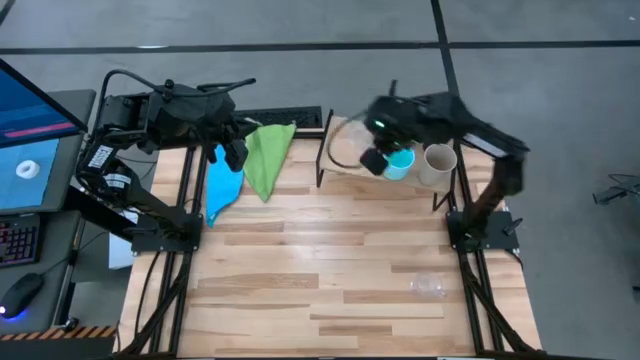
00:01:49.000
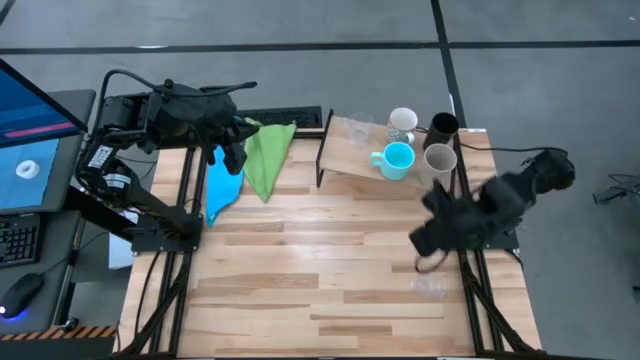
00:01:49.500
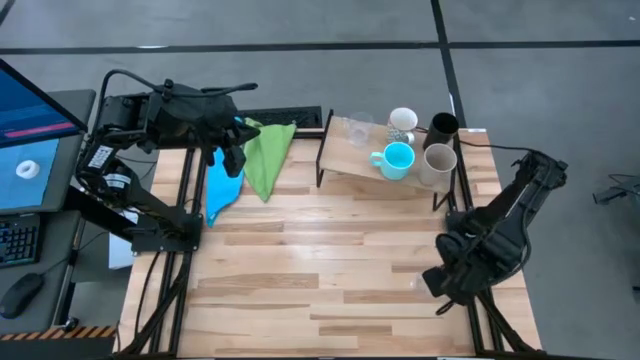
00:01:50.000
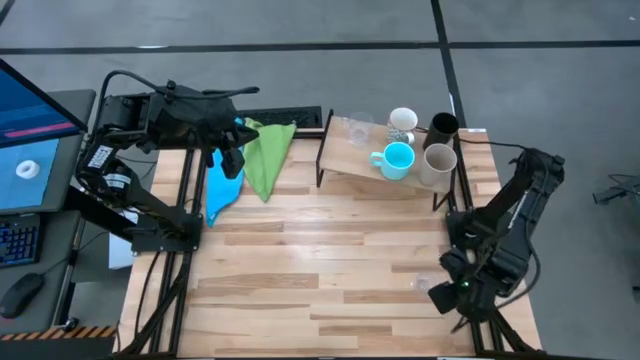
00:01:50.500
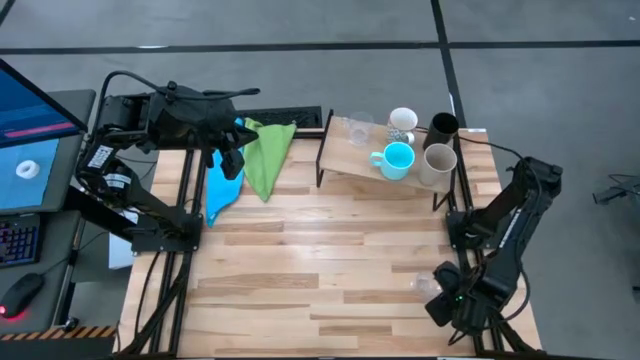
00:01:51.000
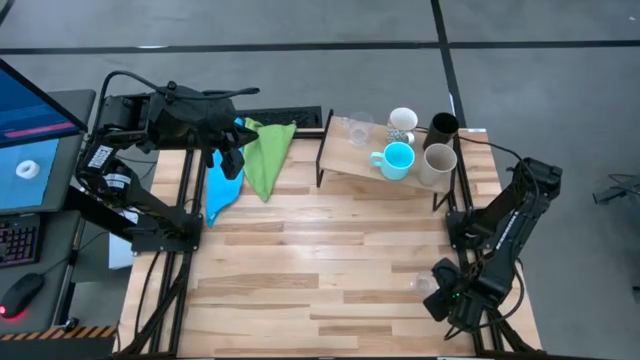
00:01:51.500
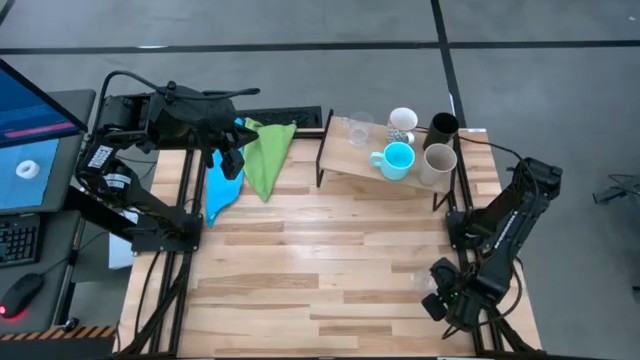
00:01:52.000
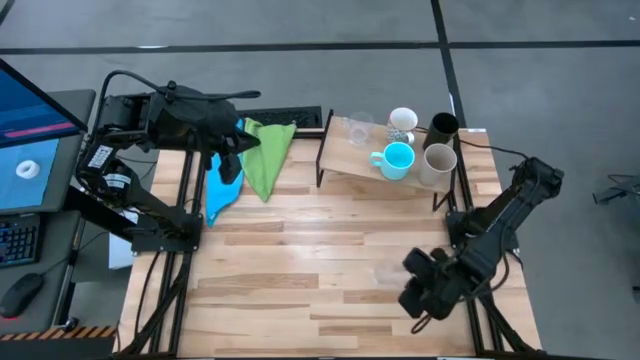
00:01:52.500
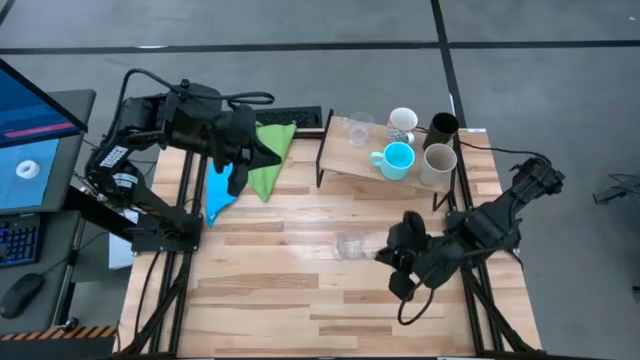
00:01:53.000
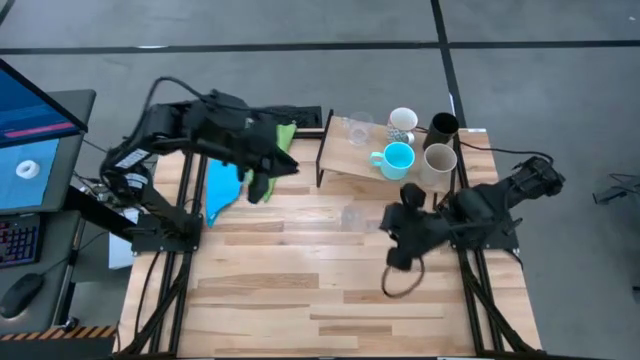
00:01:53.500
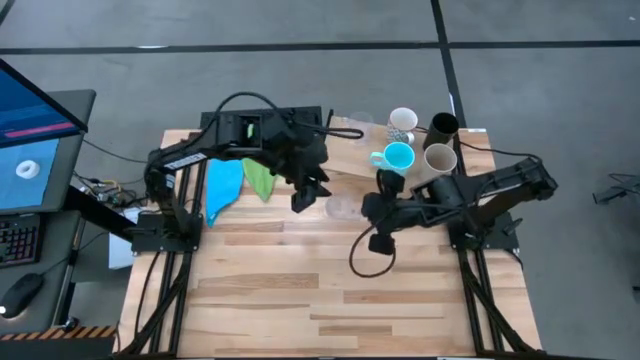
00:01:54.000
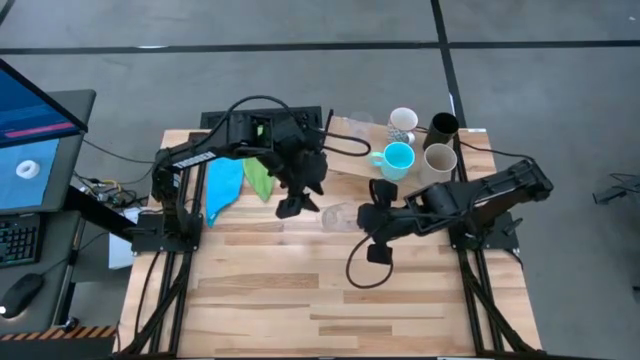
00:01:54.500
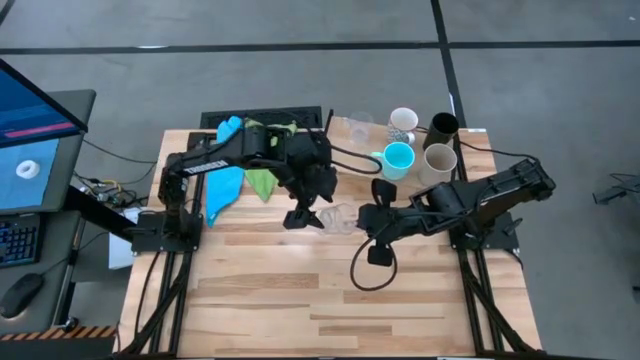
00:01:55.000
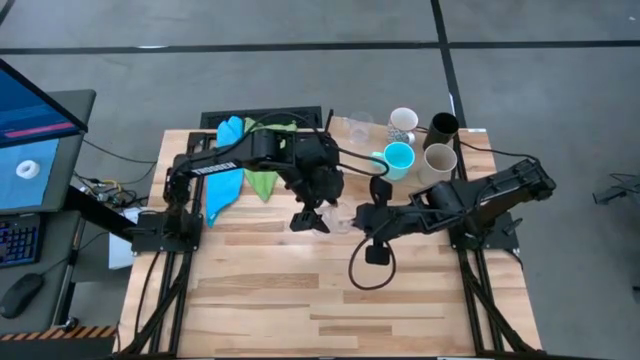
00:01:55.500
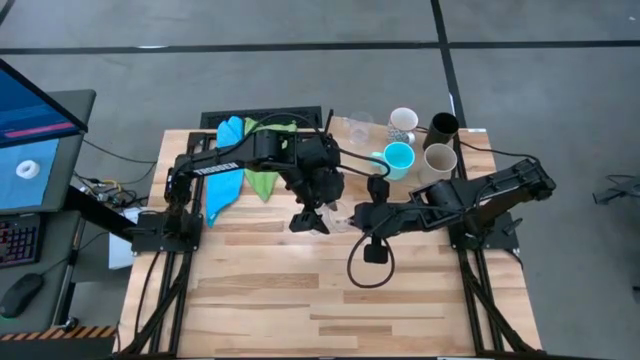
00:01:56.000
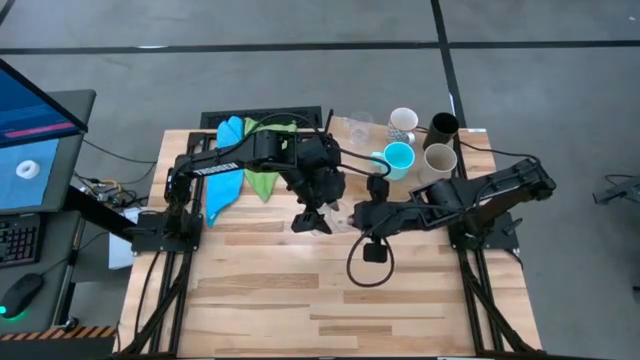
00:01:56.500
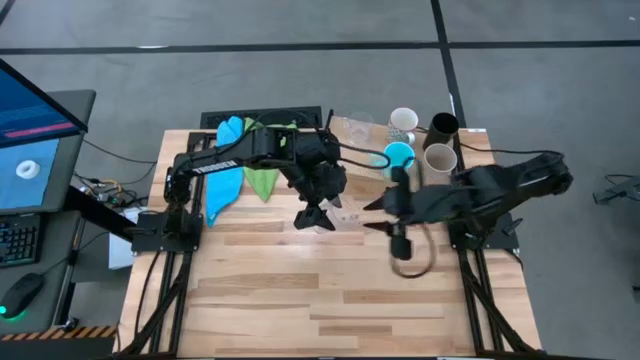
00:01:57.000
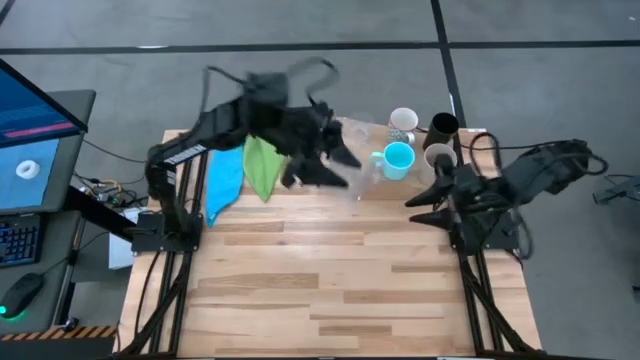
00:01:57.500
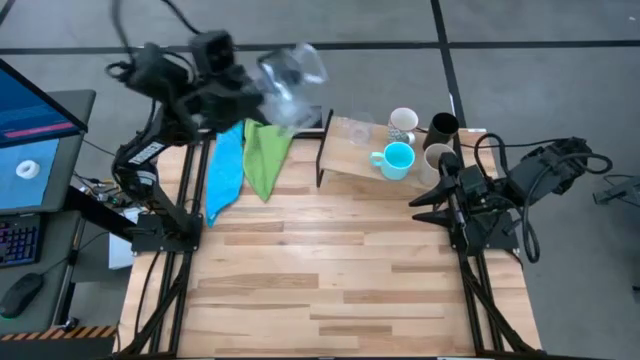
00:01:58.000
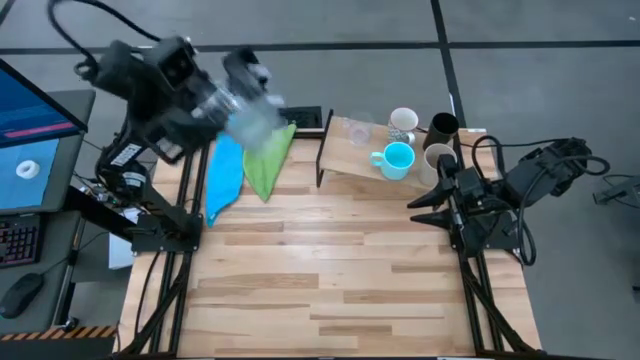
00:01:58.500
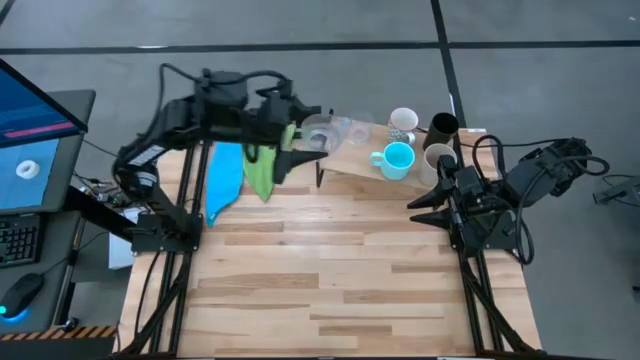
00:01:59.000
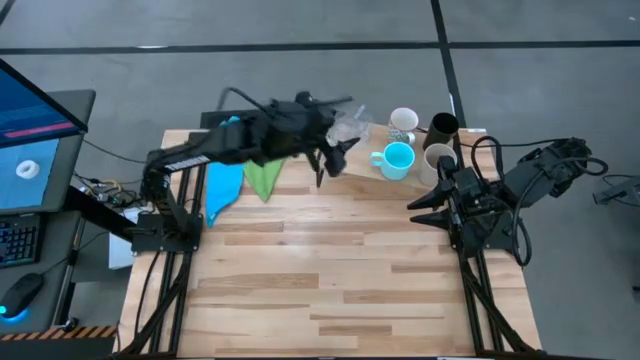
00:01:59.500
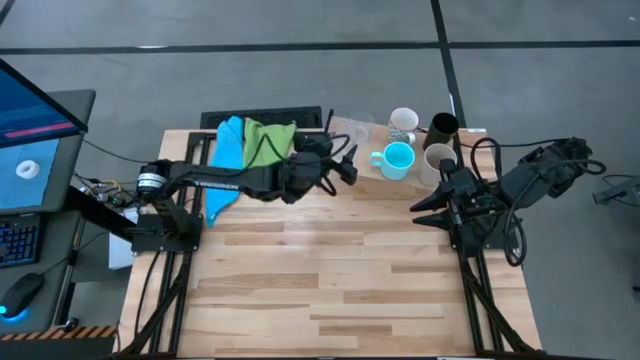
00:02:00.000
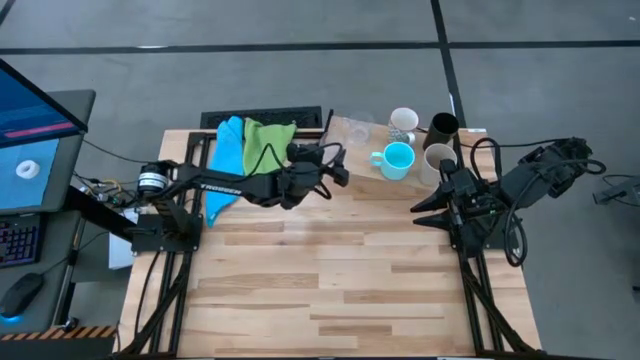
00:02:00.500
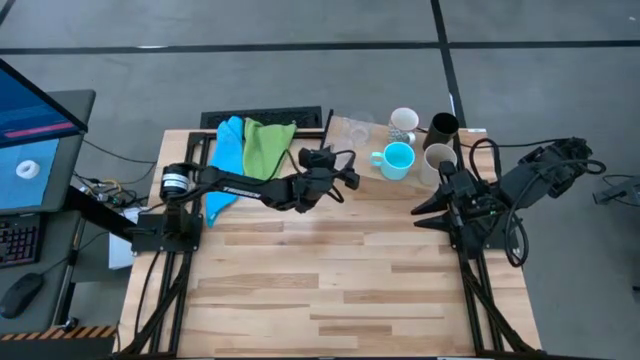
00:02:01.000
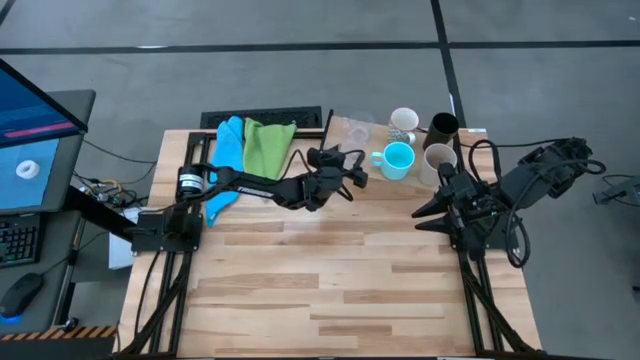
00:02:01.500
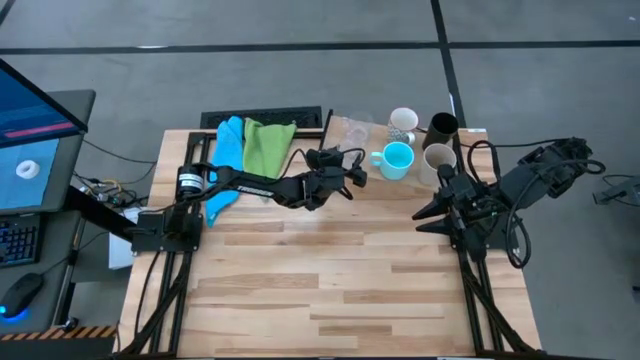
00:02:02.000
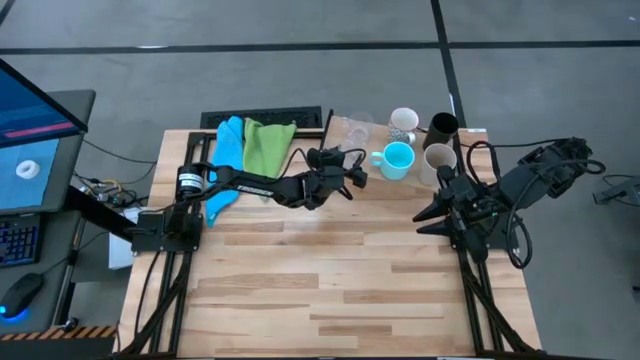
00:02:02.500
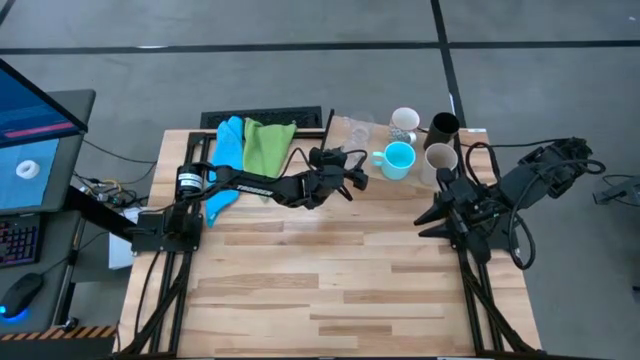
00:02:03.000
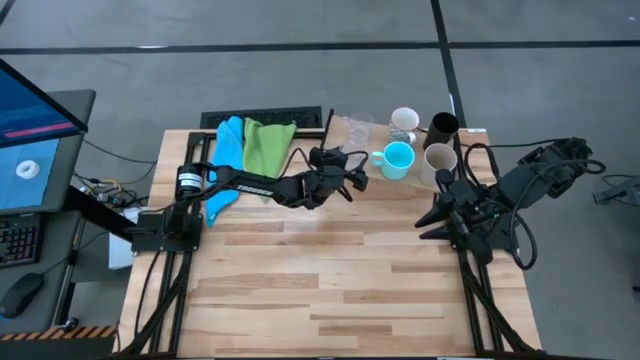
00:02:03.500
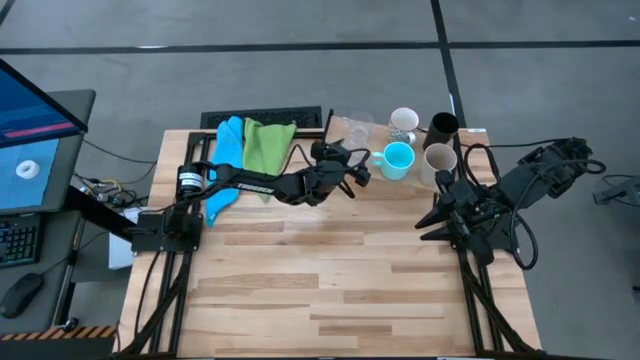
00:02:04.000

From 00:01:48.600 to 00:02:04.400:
Task: Stack small to large cups/mugs on shelf
Put the transparent mug on the shelf

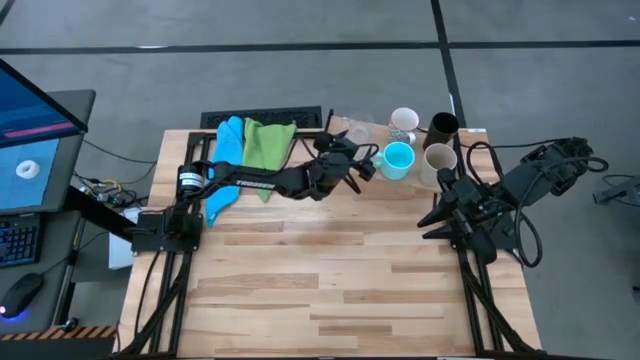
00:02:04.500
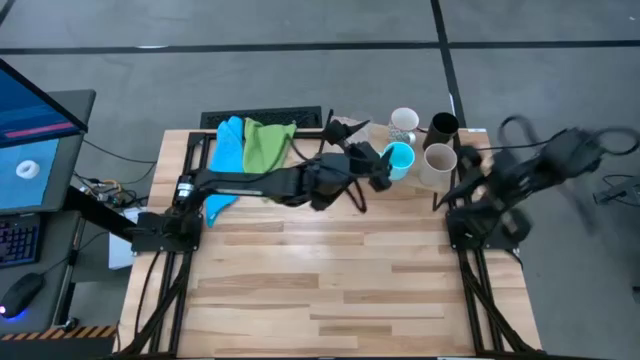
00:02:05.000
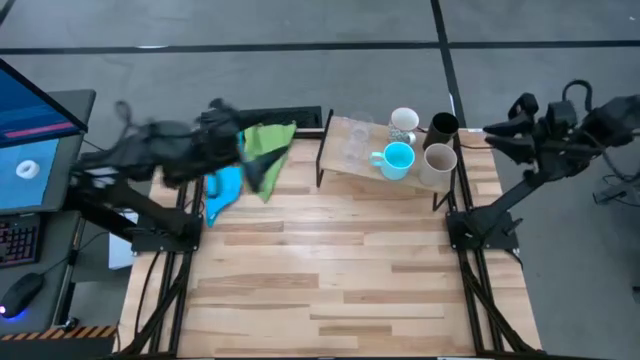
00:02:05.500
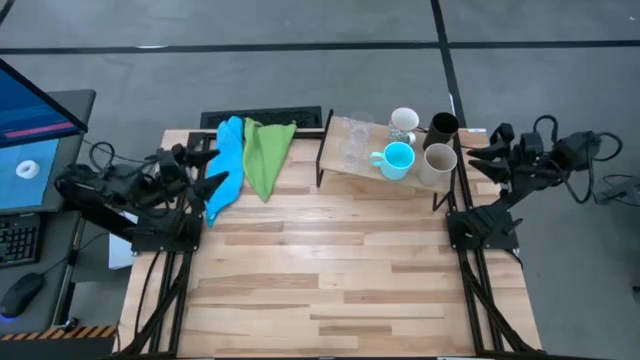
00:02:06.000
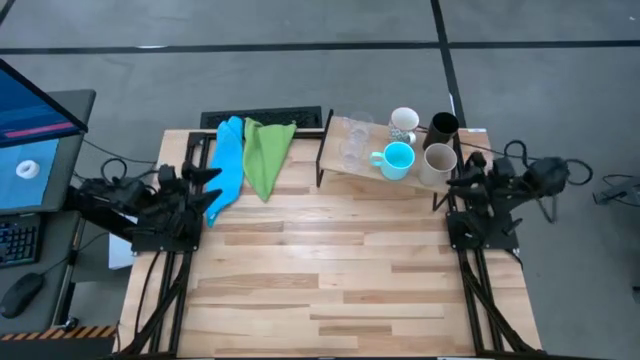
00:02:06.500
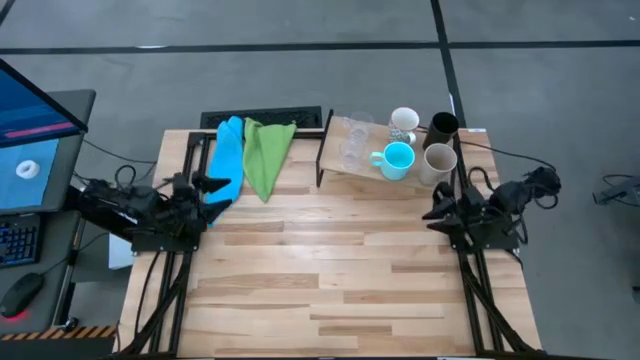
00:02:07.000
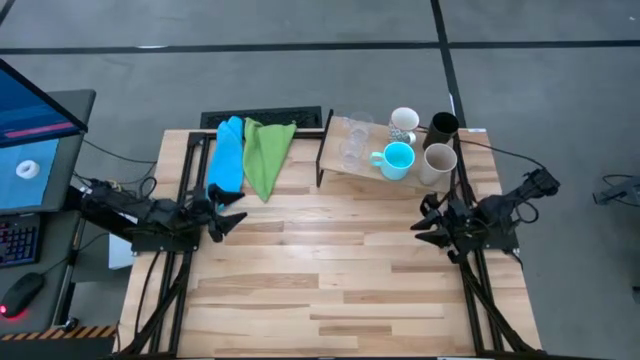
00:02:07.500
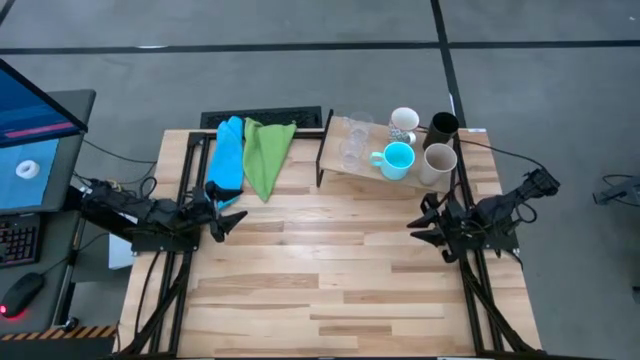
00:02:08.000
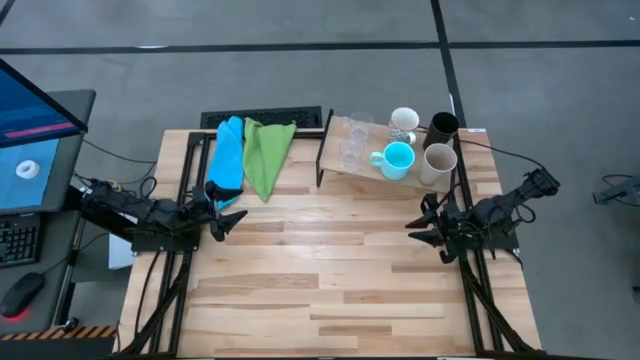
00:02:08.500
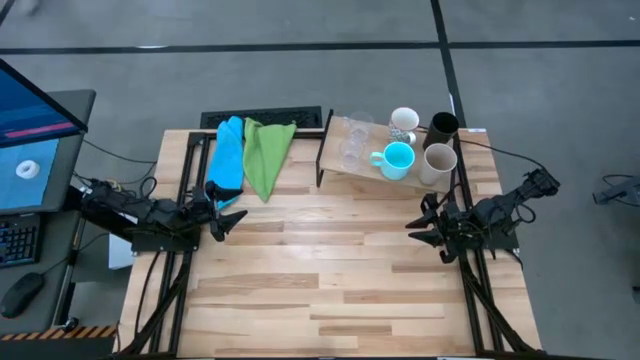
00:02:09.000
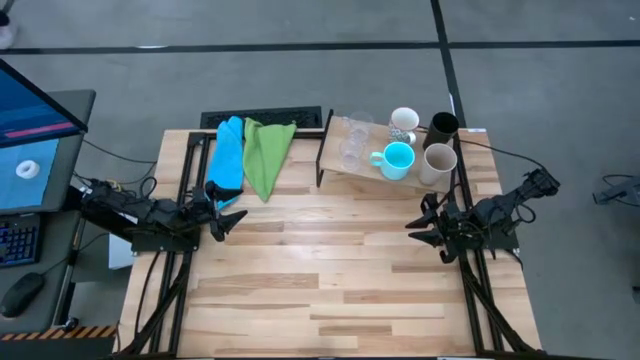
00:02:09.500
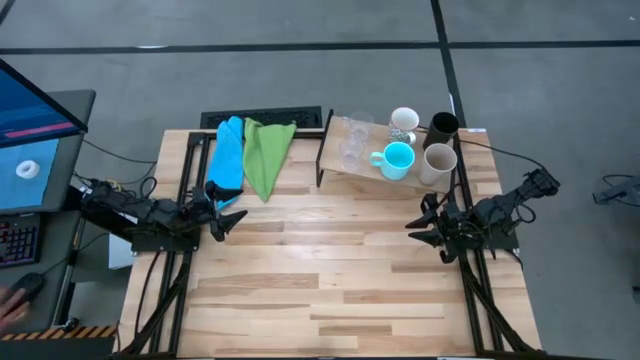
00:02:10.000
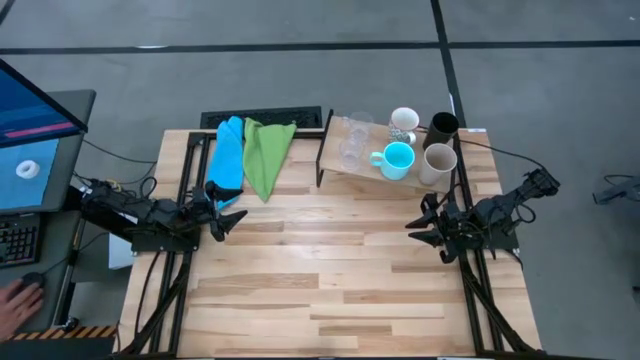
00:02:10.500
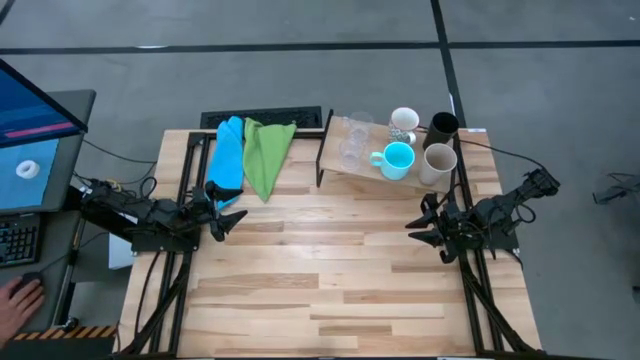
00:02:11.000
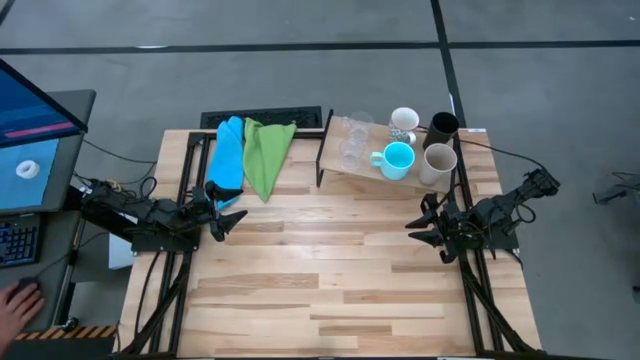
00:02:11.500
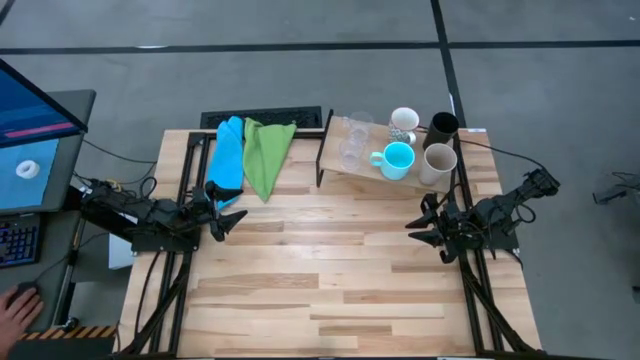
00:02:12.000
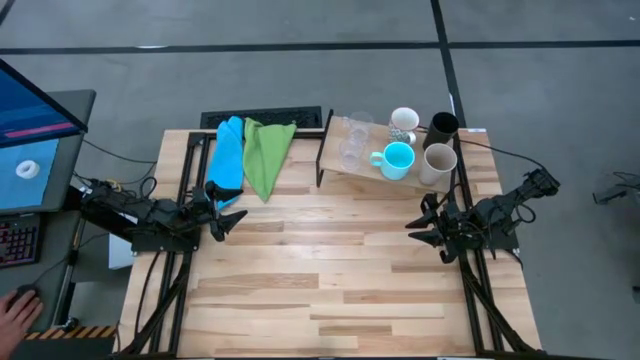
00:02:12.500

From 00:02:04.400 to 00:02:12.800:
Return To Home Position
